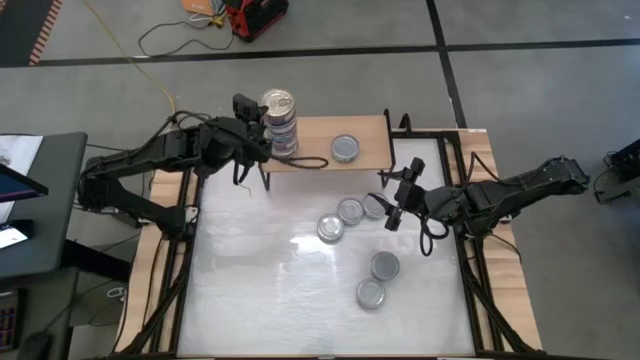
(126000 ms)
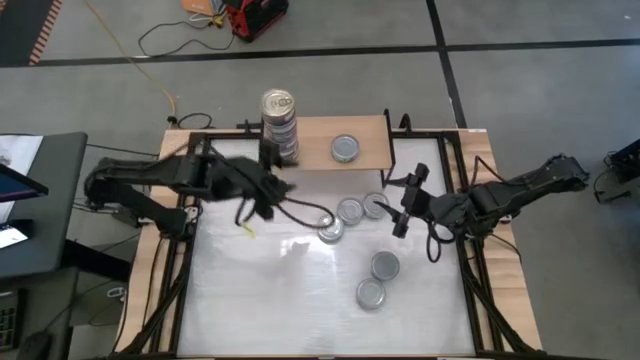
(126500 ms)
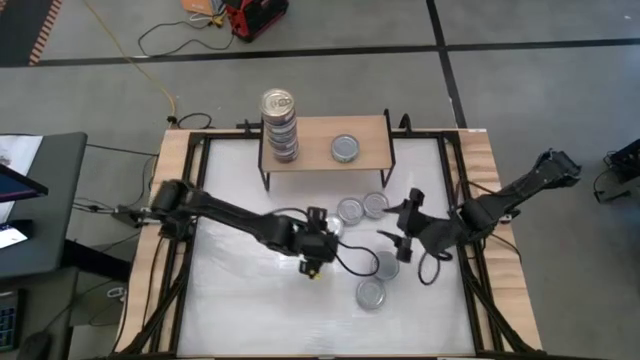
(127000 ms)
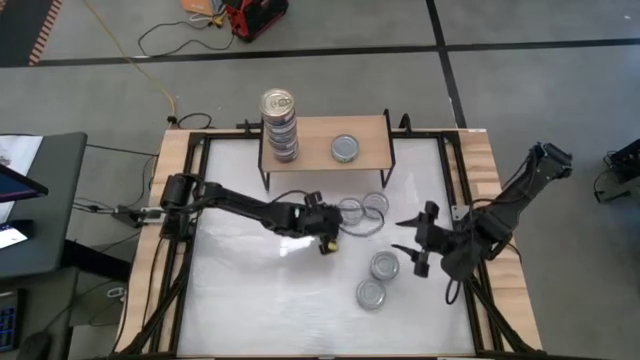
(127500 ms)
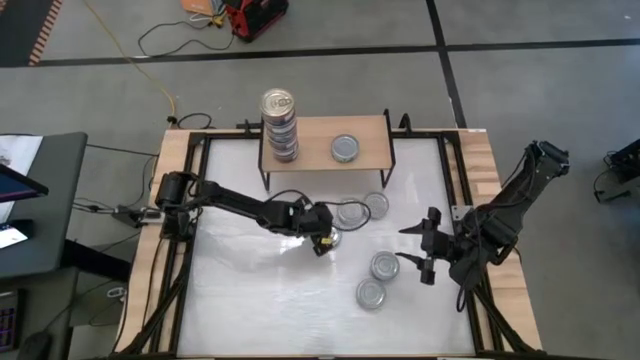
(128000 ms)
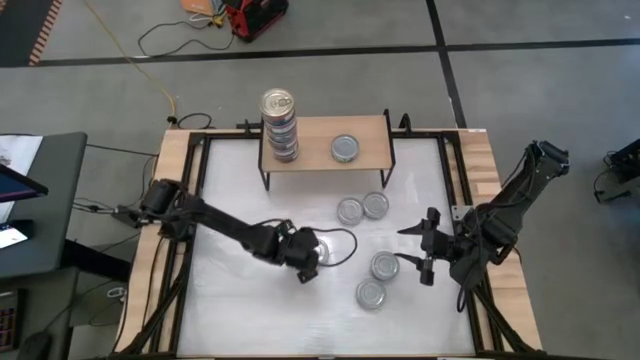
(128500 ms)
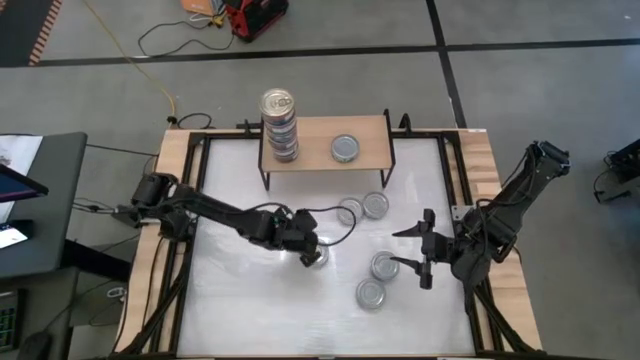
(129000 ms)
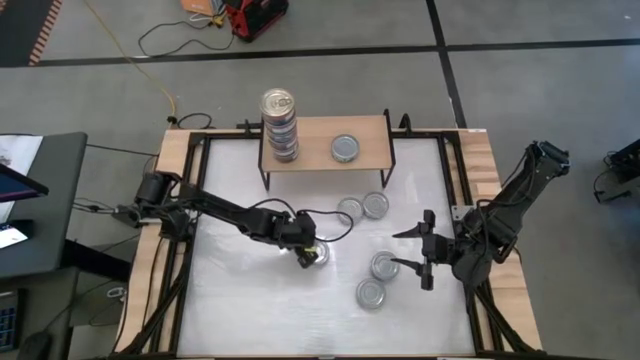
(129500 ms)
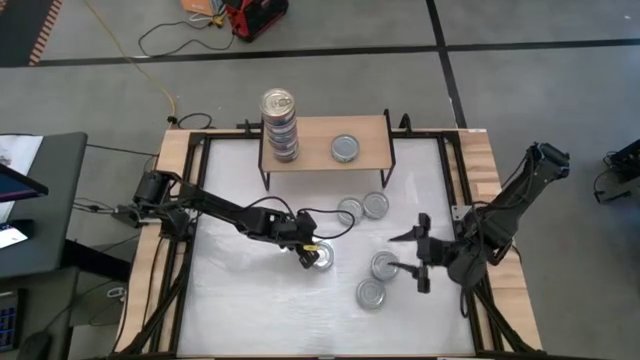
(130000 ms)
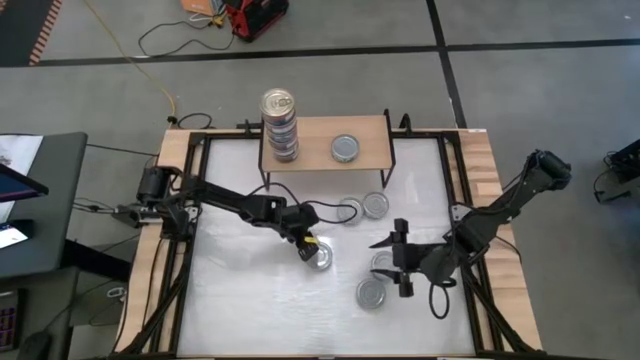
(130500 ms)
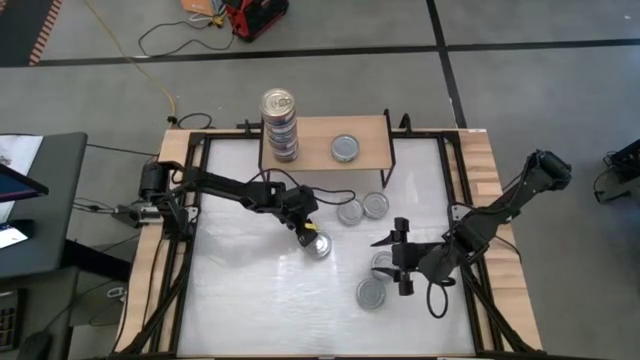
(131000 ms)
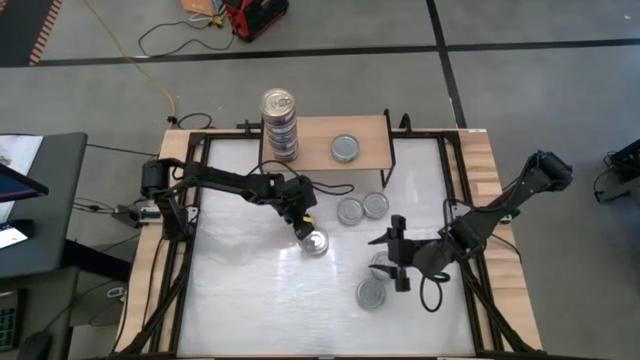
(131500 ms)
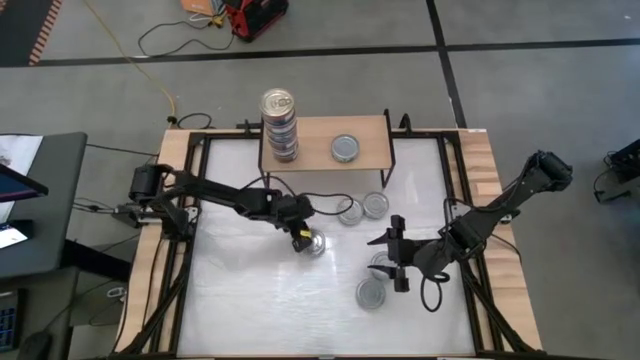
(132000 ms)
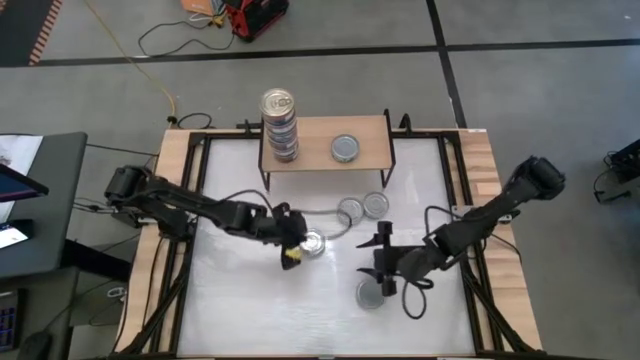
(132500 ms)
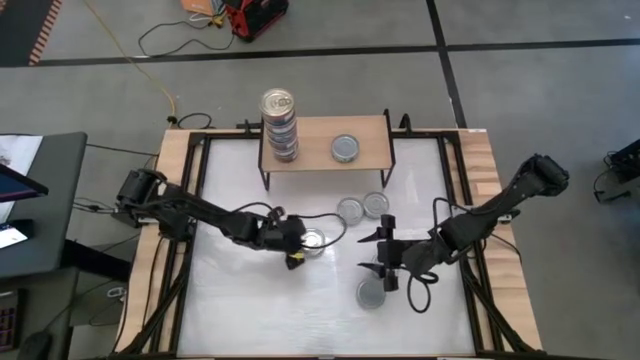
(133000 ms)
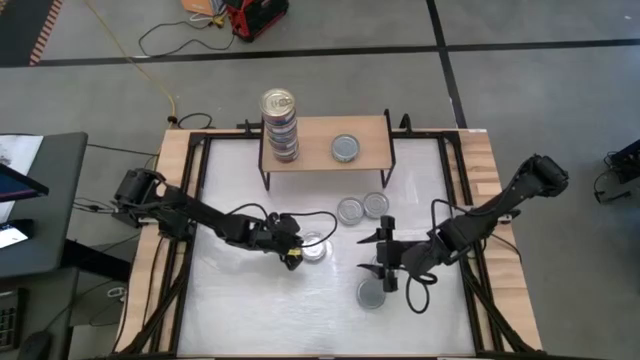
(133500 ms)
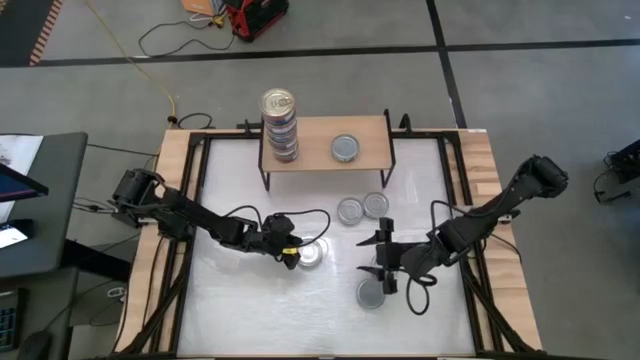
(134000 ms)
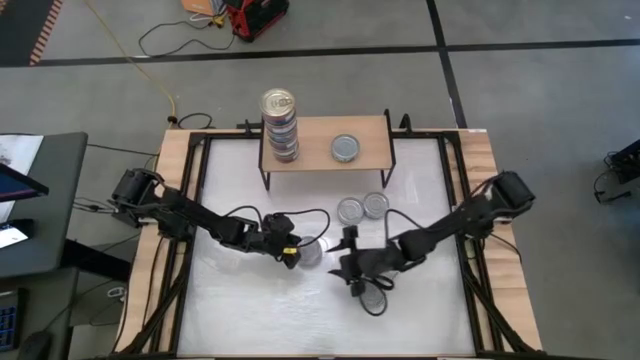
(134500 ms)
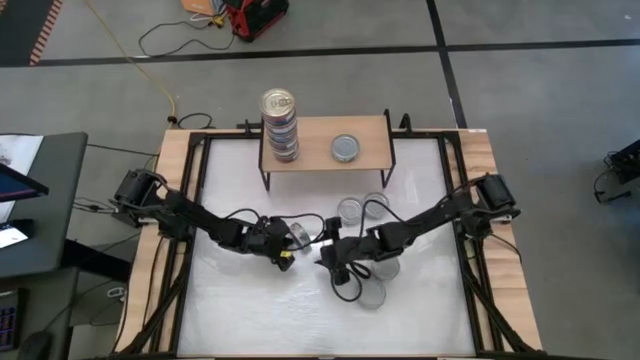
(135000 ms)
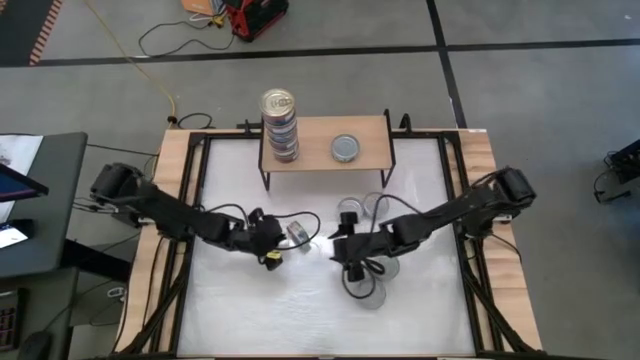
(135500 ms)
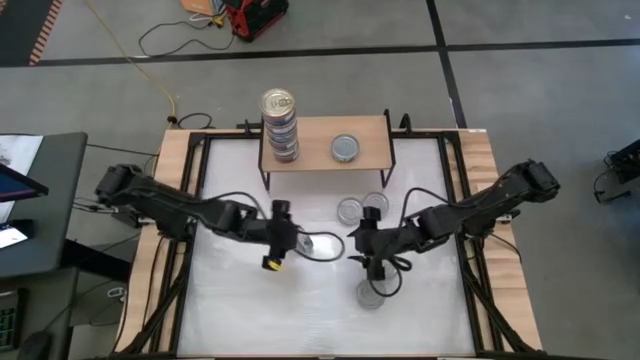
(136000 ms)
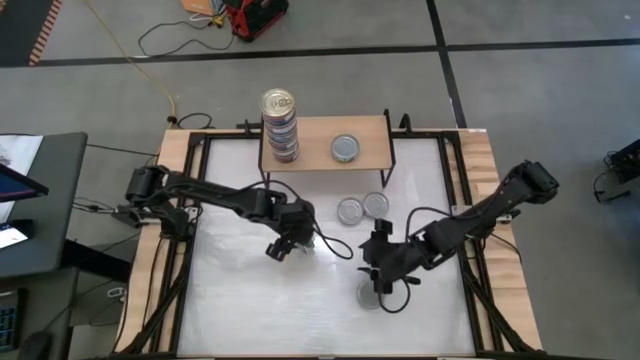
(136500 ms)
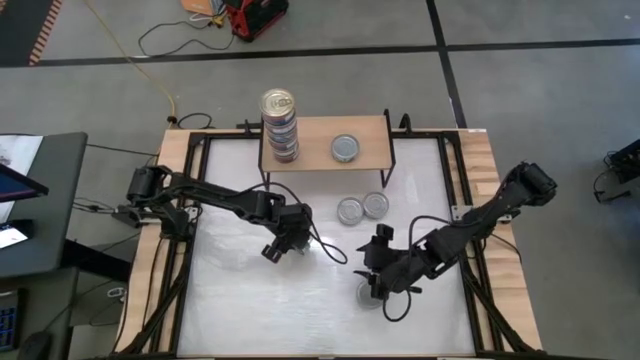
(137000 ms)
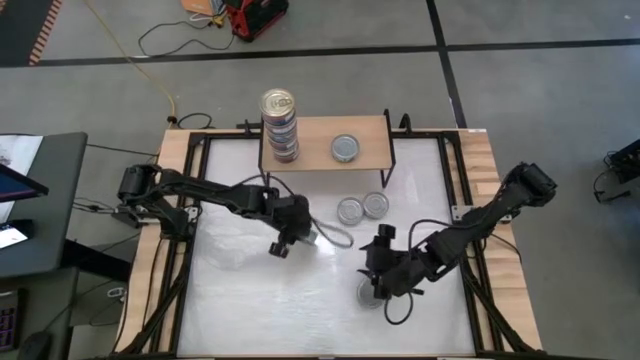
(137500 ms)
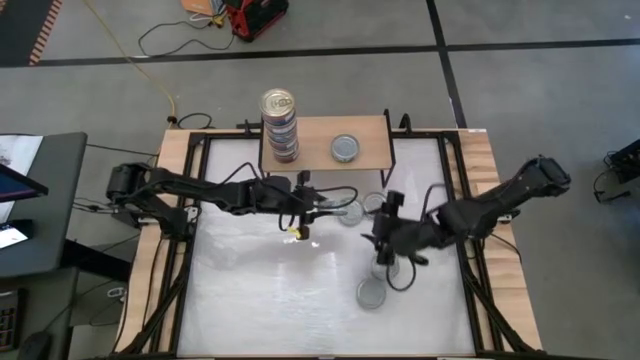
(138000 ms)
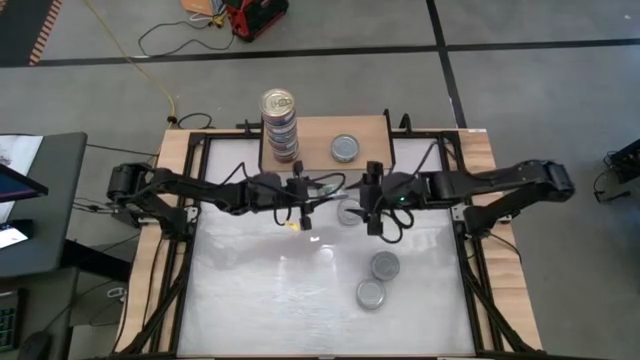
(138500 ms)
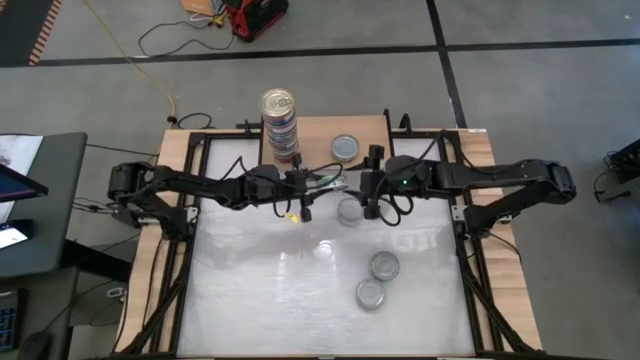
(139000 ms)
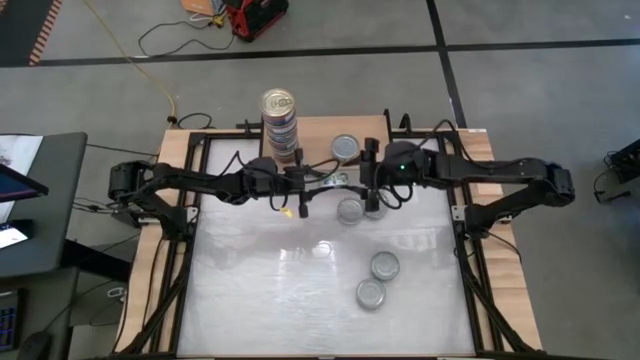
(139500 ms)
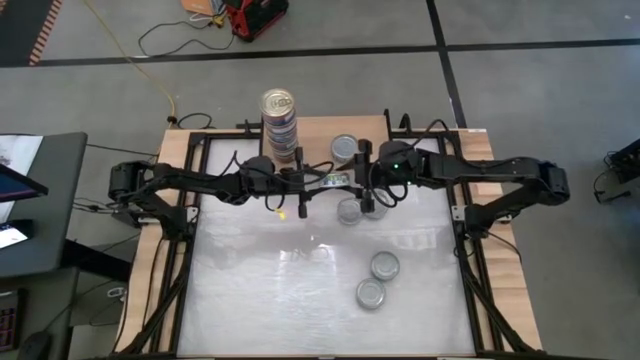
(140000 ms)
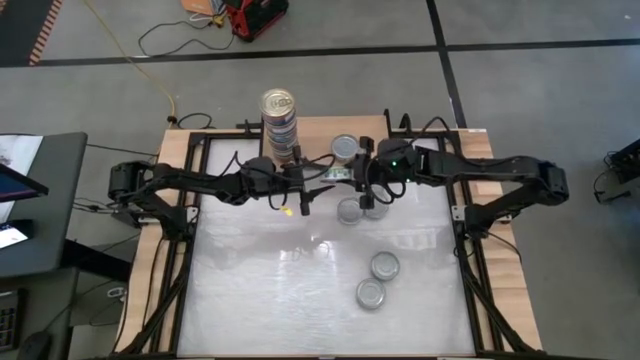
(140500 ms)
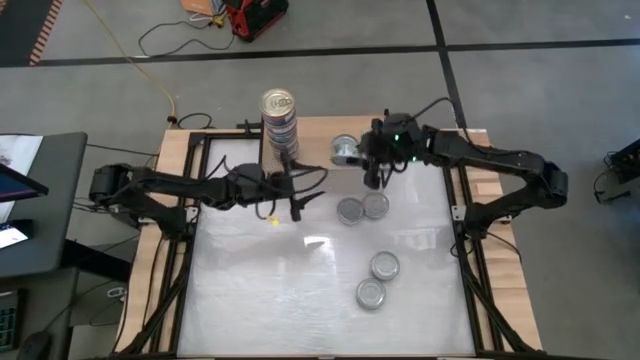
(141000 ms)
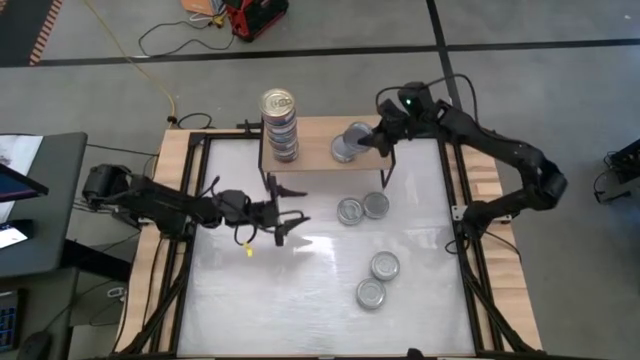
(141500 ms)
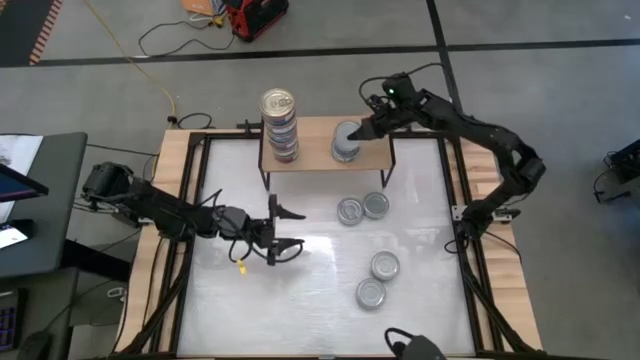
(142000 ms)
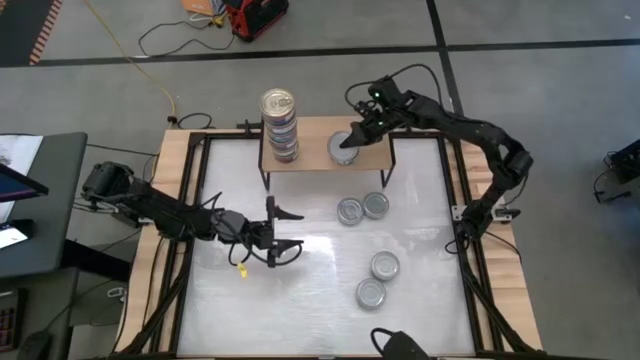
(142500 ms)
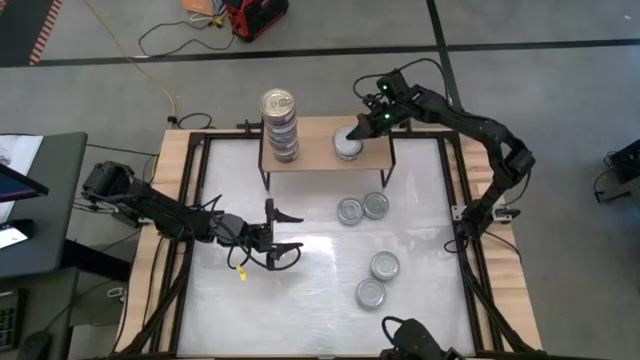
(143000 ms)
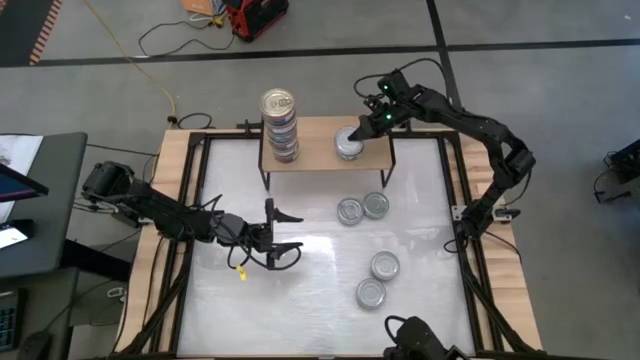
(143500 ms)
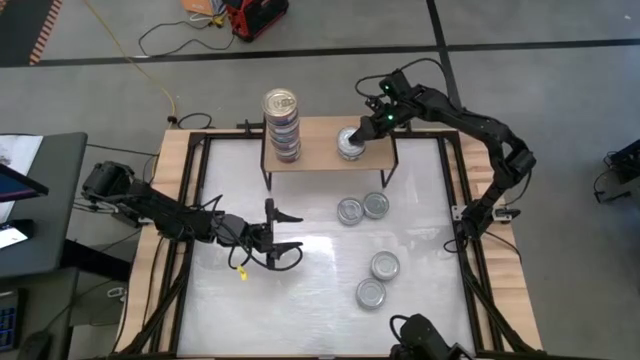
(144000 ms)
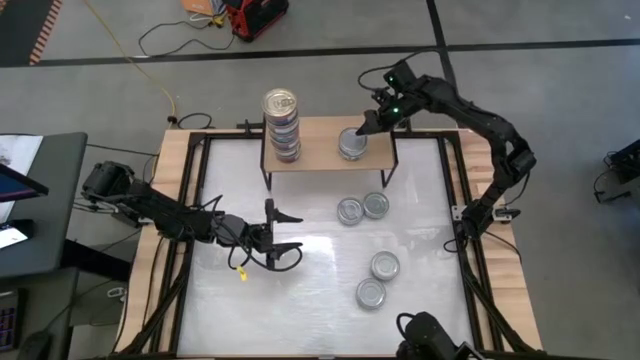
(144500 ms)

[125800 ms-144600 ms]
Task: Stack canned seafood by type on shelf
Stack the green tuna can on top of the green tuna can

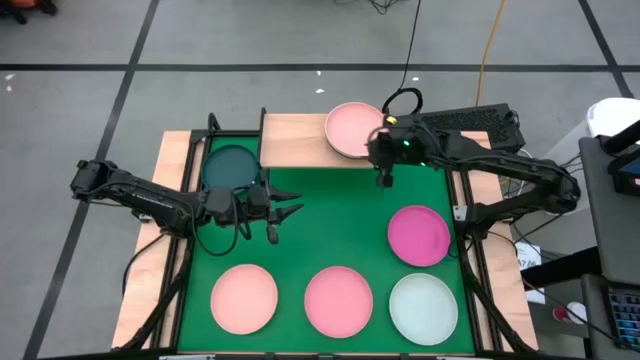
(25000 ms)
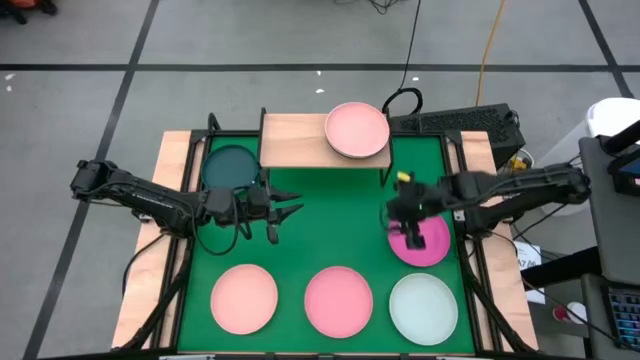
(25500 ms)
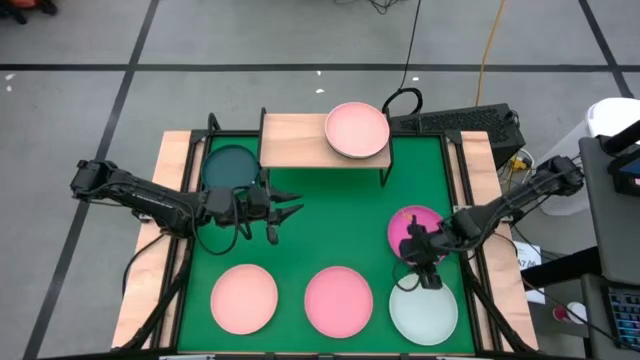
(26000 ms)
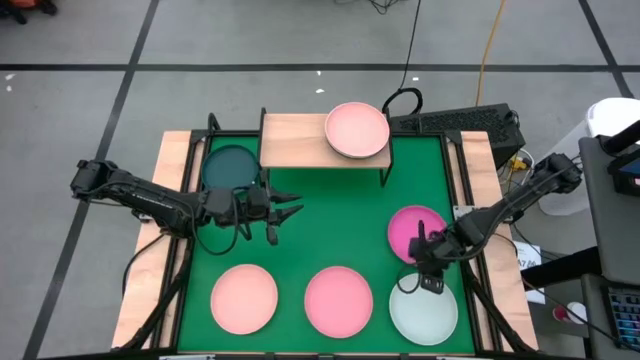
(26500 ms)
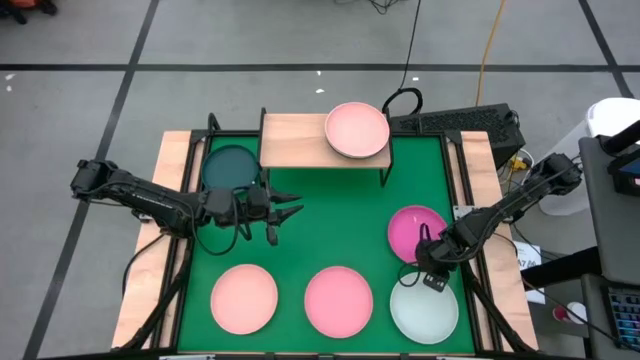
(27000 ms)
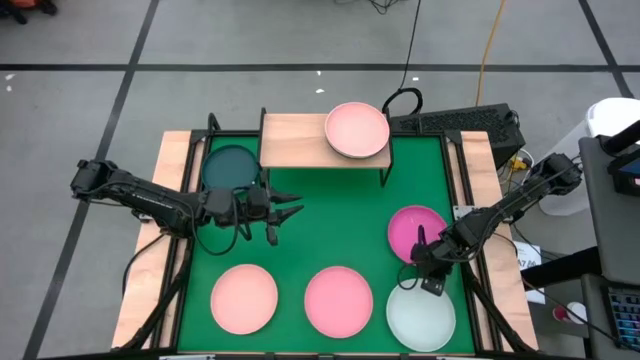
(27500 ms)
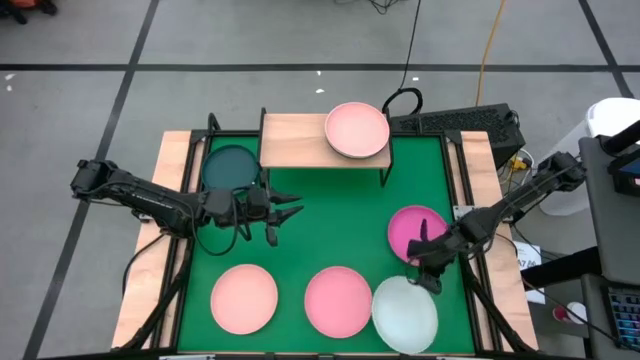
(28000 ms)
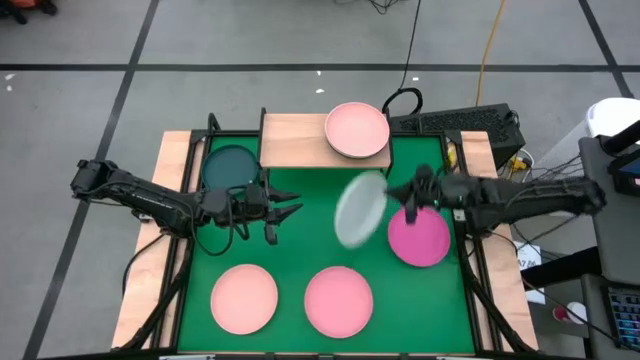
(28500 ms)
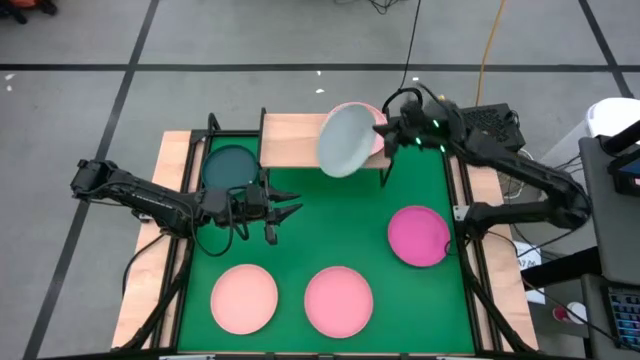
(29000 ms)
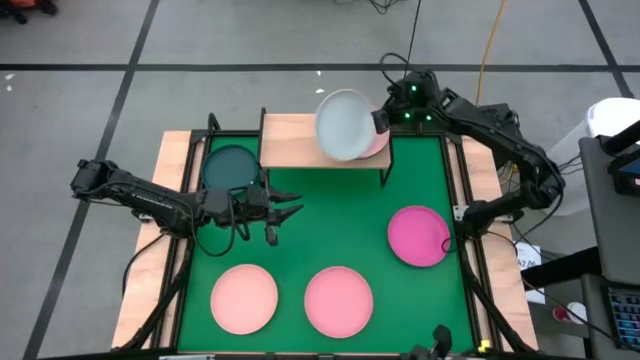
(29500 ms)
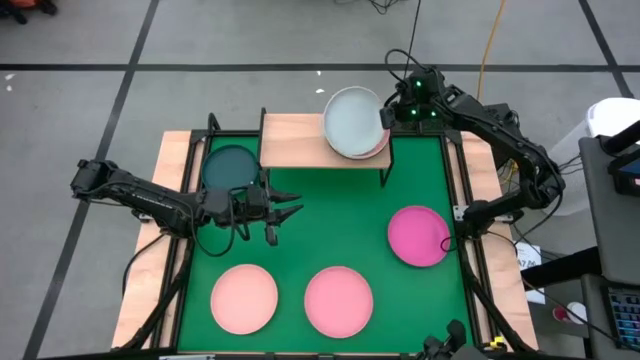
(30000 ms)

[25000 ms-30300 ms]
Task: Place and stack plates onto a shelf
Stack the white plate on top of the light orange plate on the shelf
